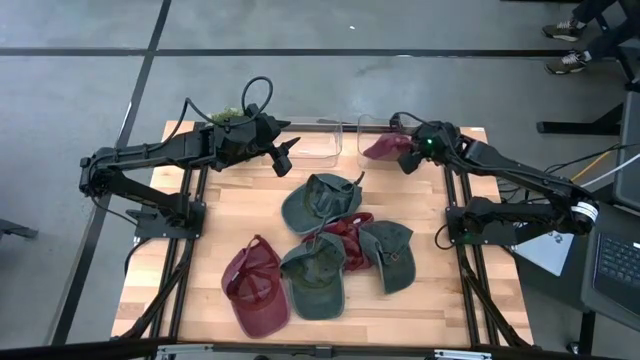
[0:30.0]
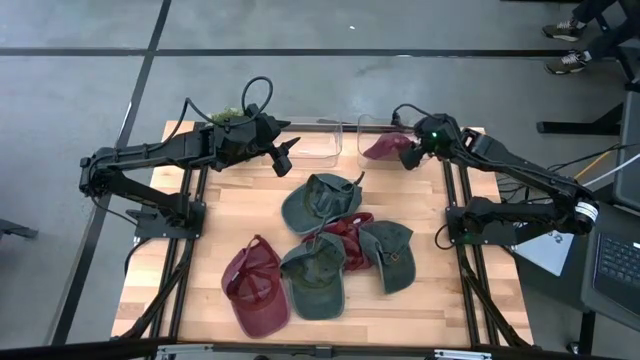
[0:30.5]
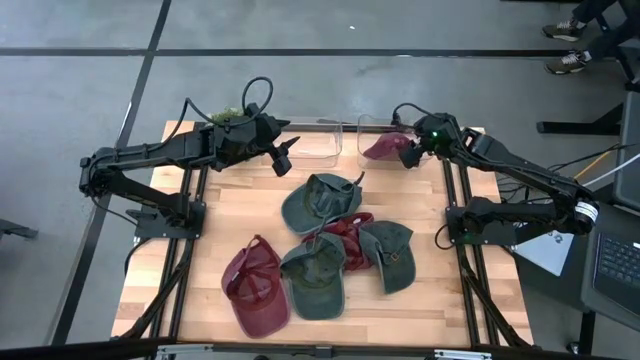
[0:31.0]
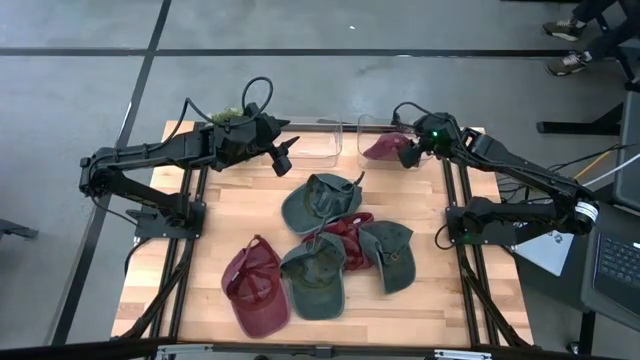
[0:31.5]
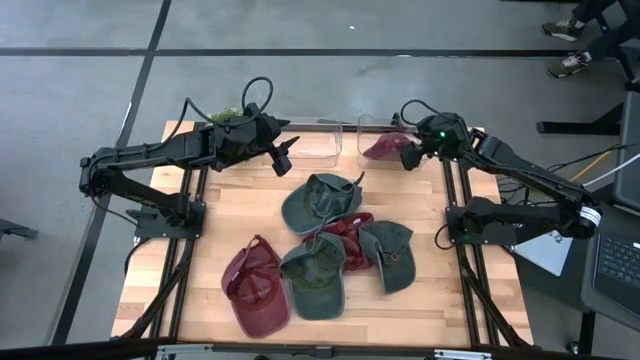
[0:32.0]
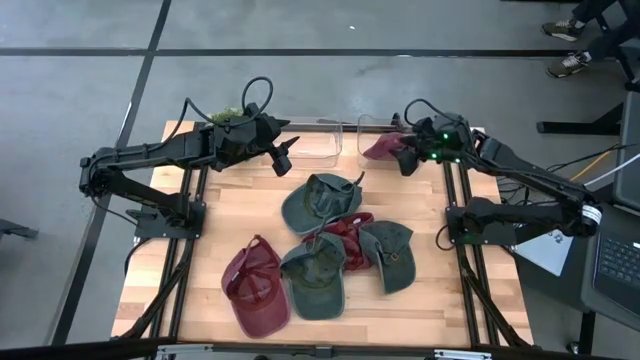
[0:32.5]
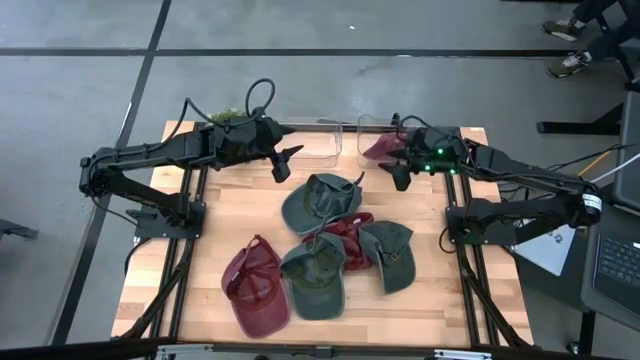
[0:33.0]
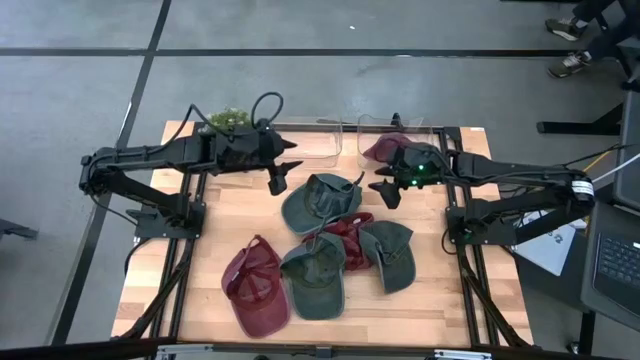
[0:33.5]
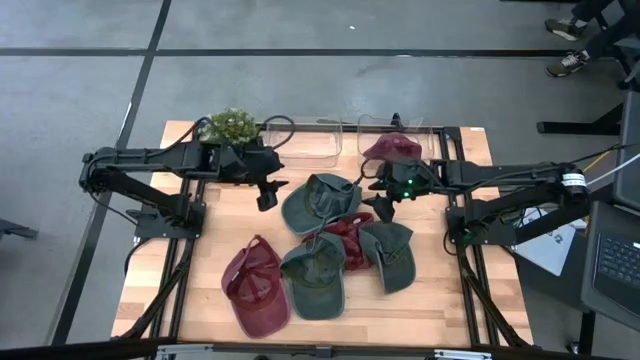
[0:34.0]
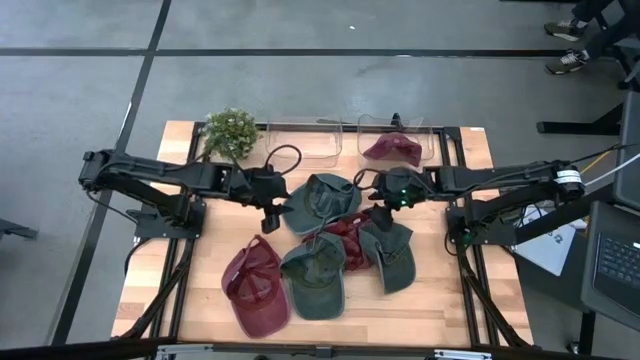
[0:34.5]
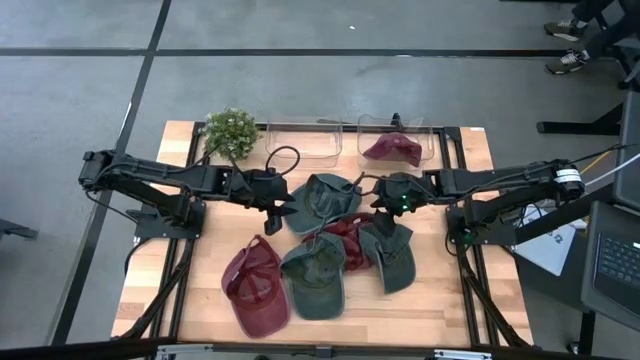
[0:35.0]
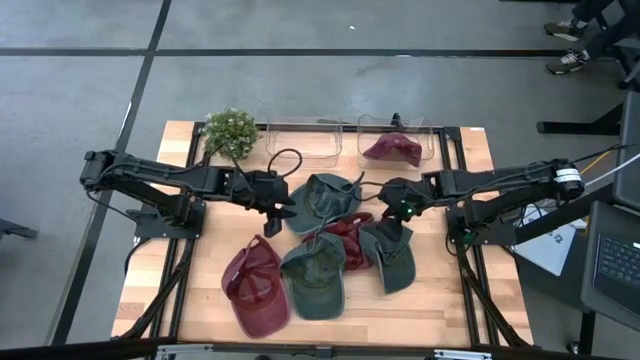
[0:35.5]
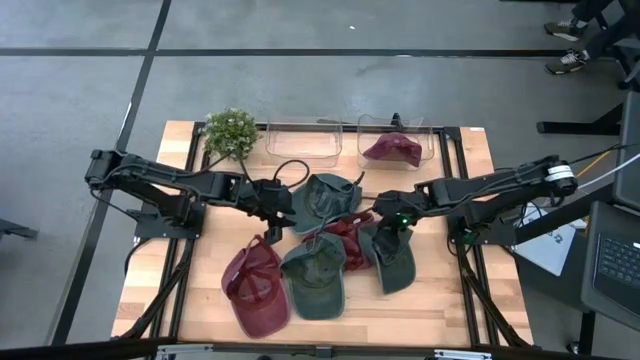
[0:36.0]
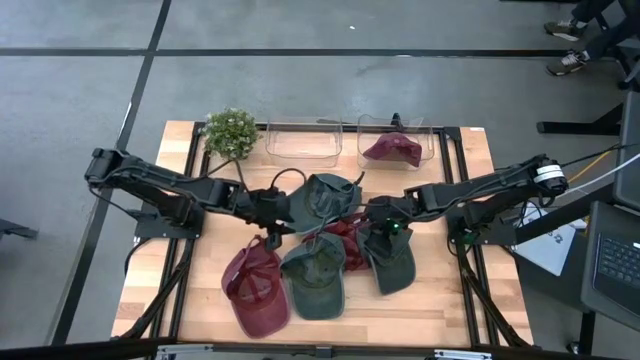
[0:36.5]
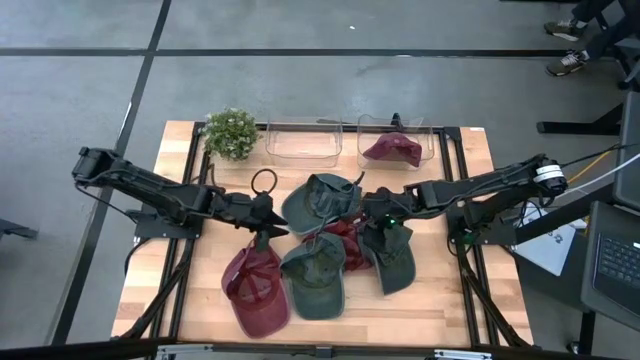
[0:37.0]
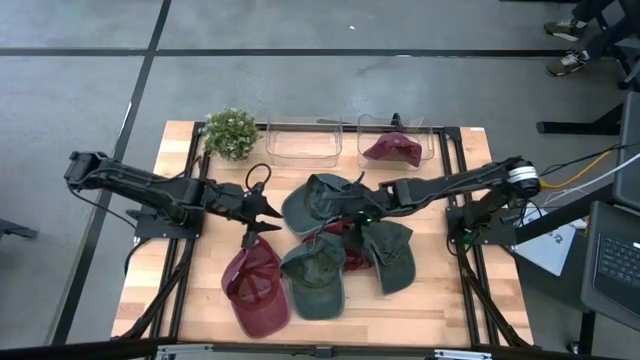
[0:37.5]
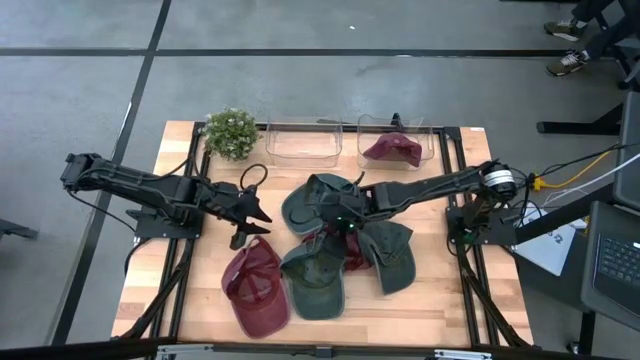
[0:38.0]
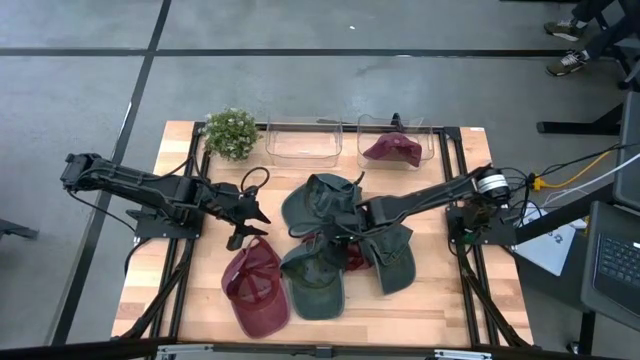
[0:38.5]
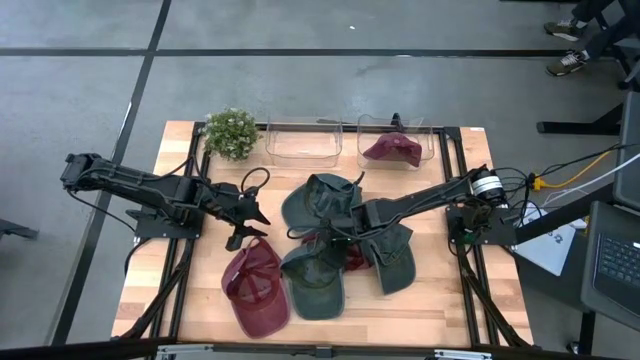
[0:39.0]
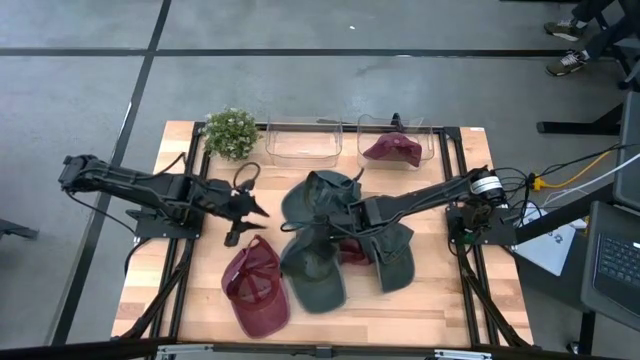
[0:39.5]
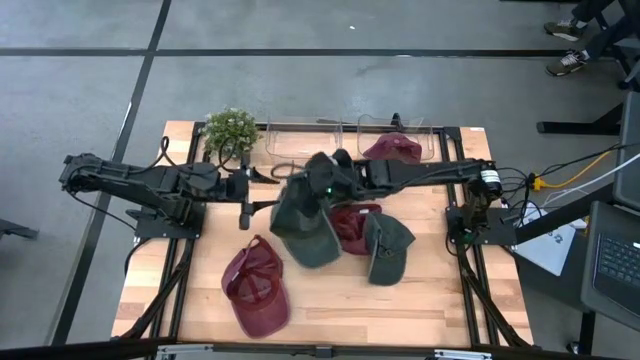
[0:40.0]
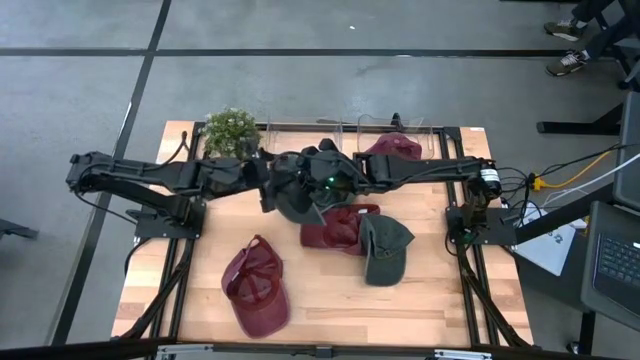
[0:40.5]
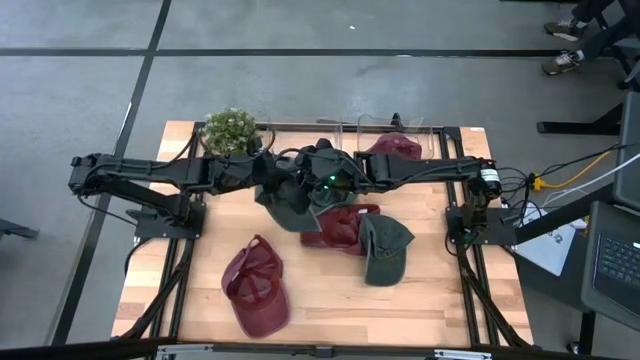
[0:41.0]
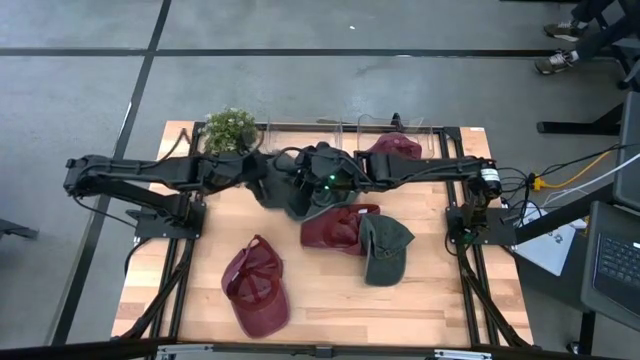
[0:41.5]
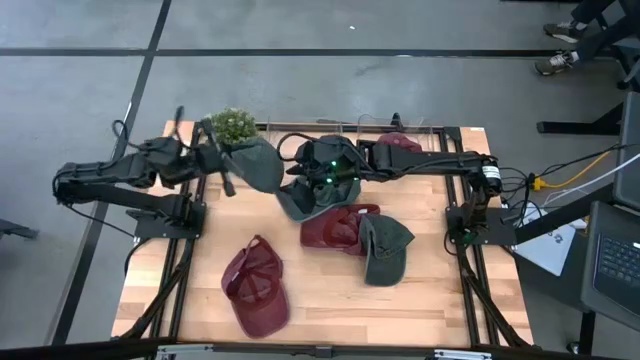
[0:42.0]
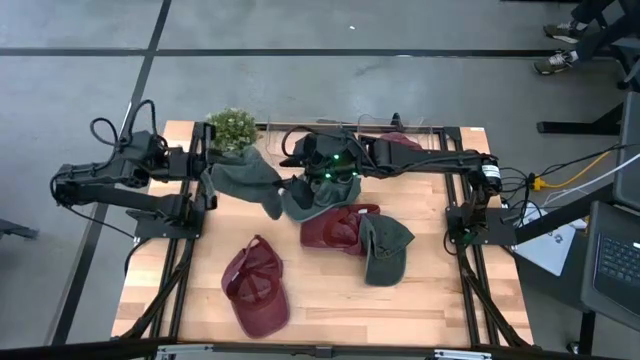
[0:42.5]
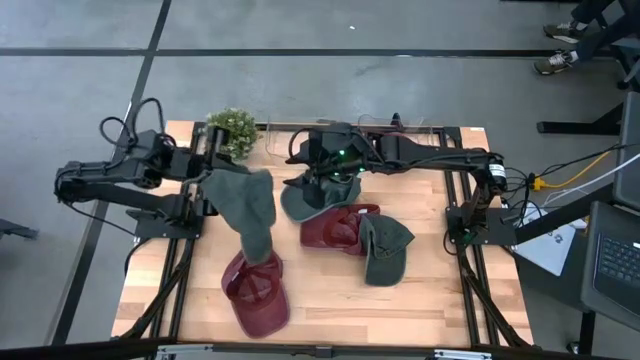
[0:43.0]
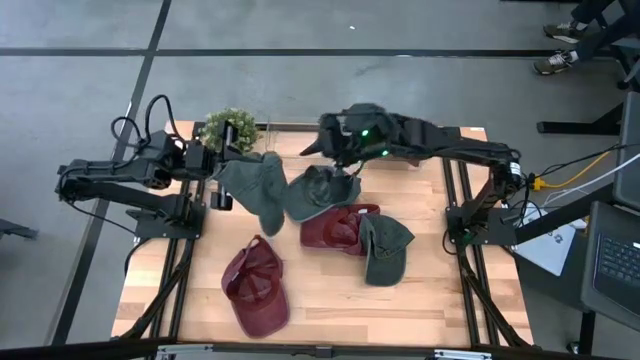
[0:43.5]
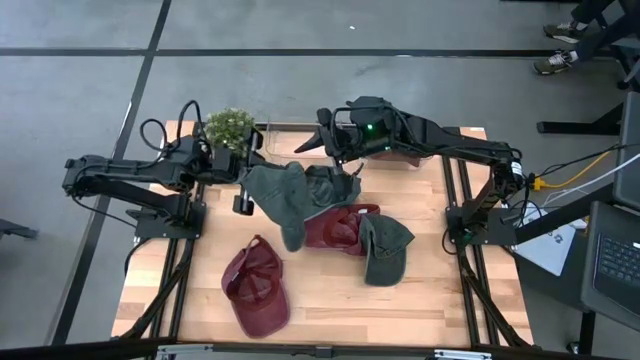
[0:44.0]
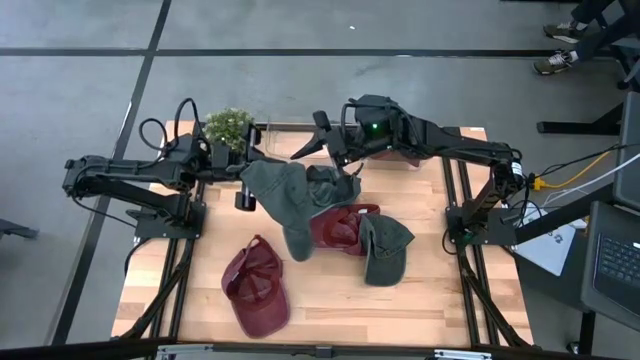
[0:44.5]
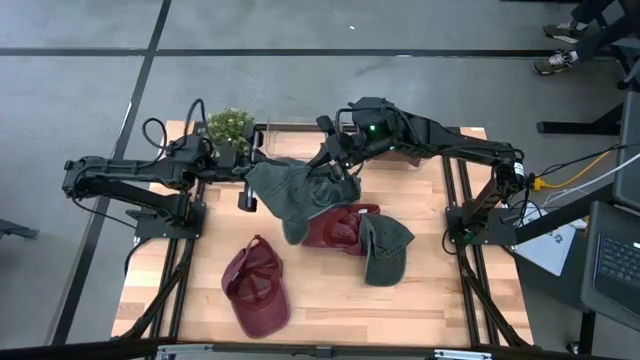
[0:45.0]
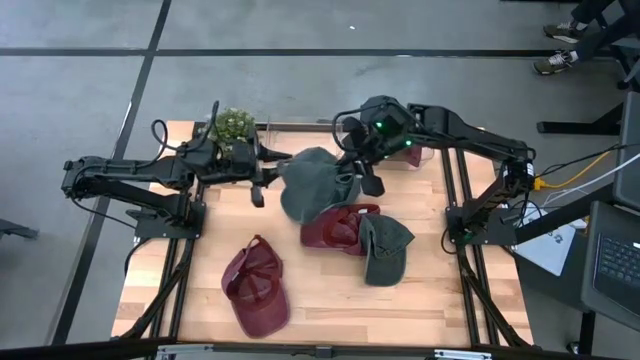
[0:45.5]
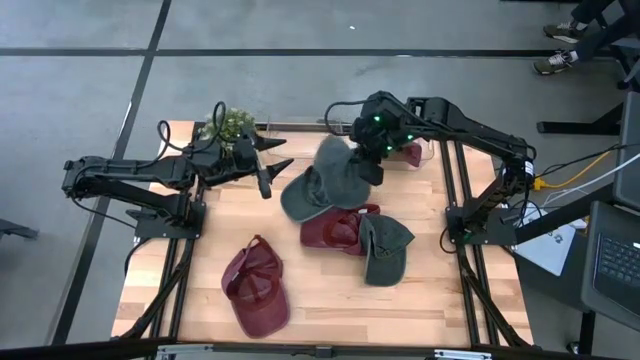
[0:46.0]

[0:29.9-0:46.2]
Task: Pick & Place hat
Put the bottom left gray cap into the left transparent bin

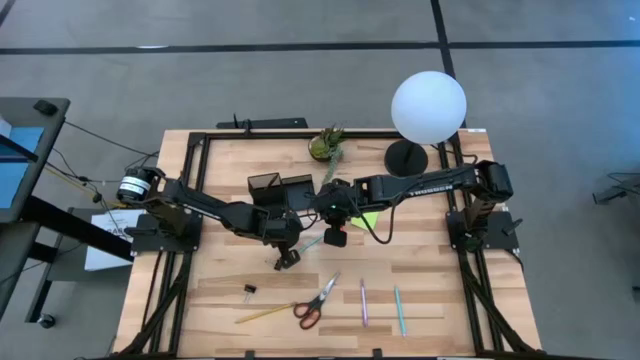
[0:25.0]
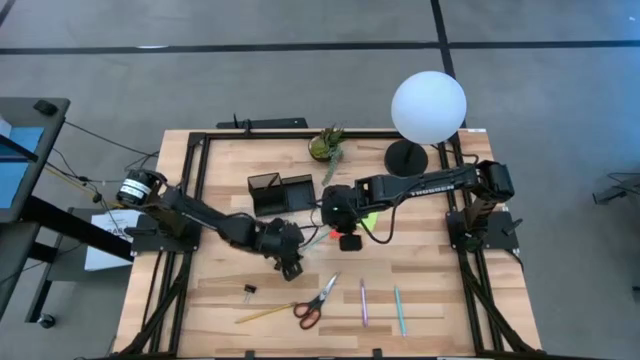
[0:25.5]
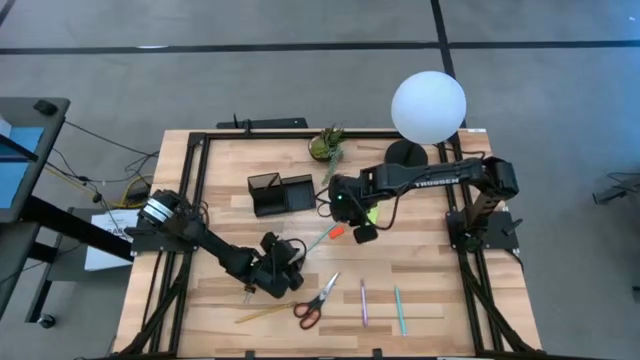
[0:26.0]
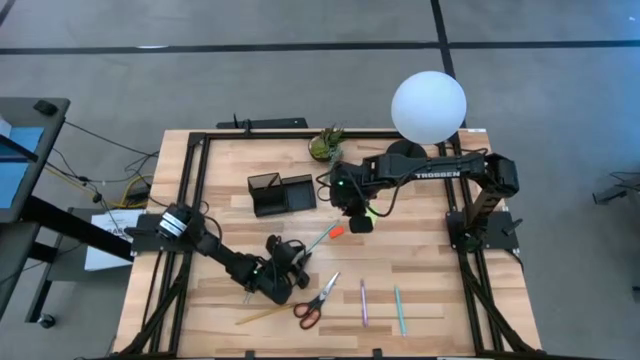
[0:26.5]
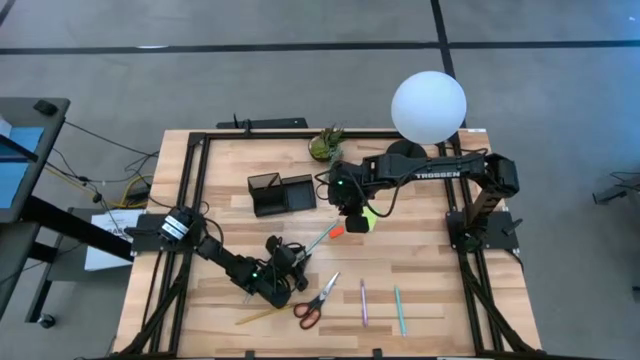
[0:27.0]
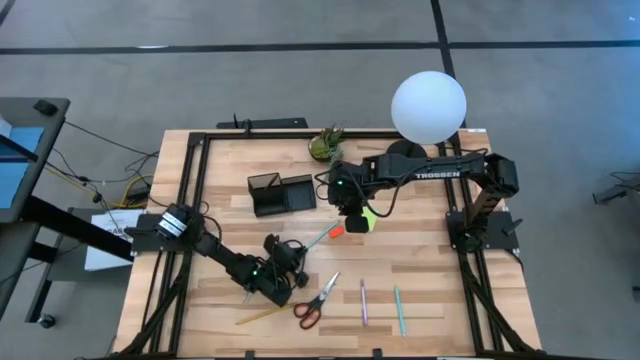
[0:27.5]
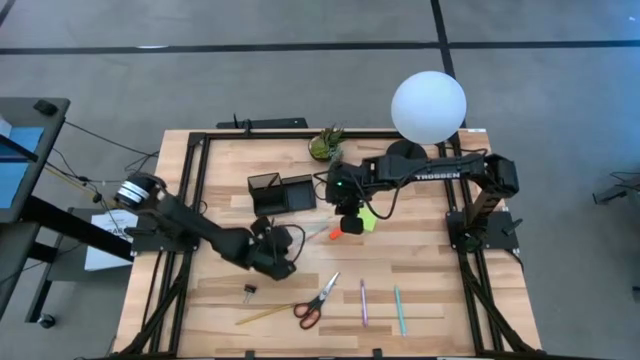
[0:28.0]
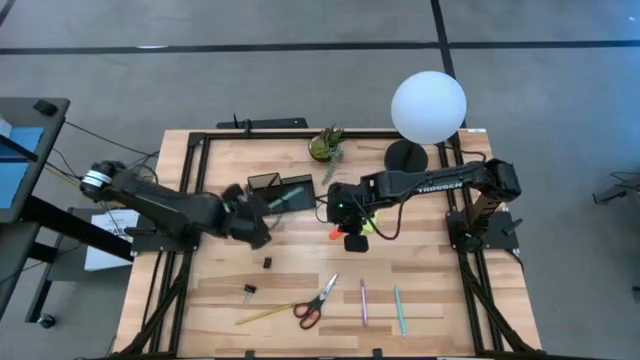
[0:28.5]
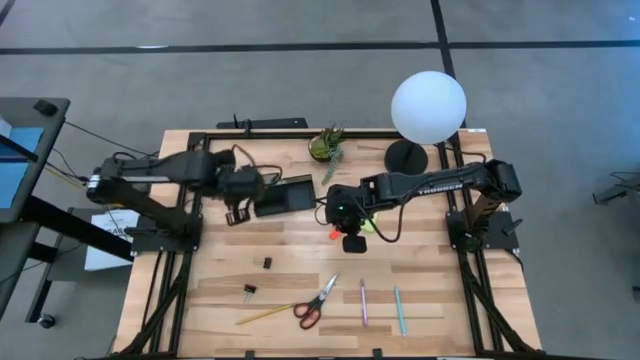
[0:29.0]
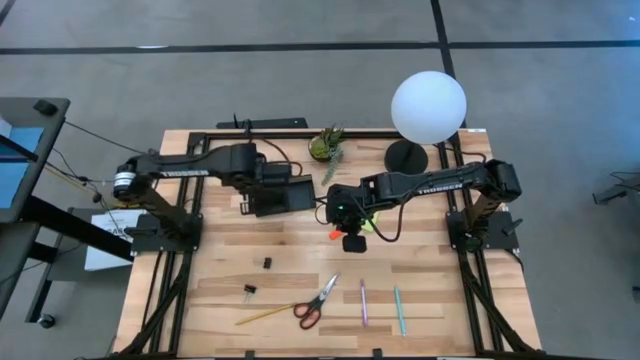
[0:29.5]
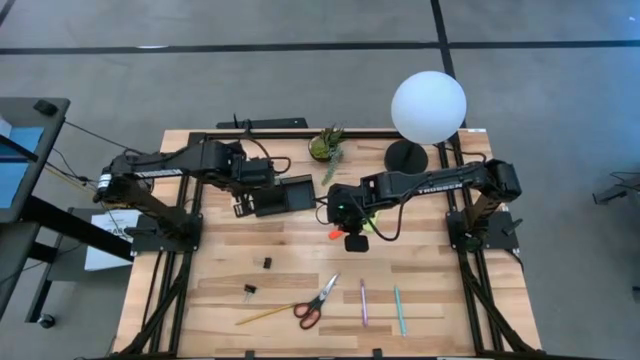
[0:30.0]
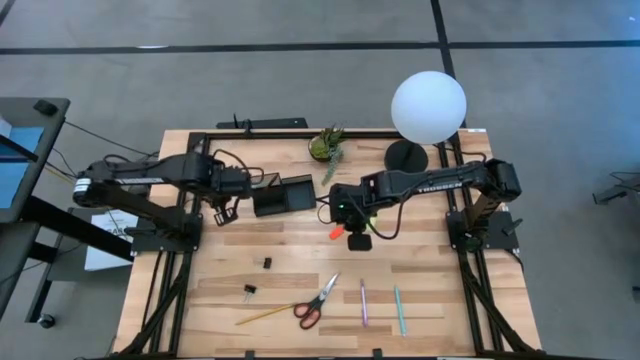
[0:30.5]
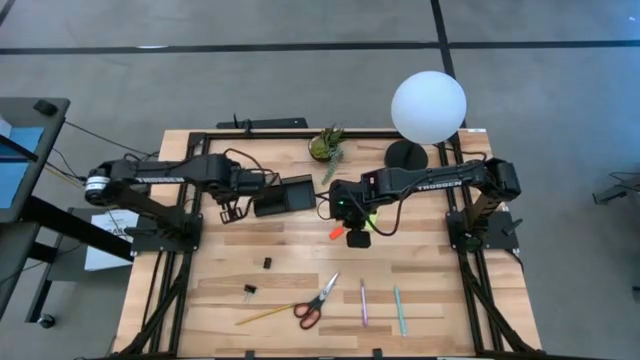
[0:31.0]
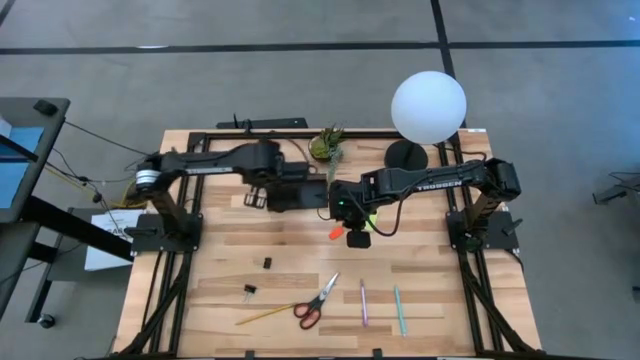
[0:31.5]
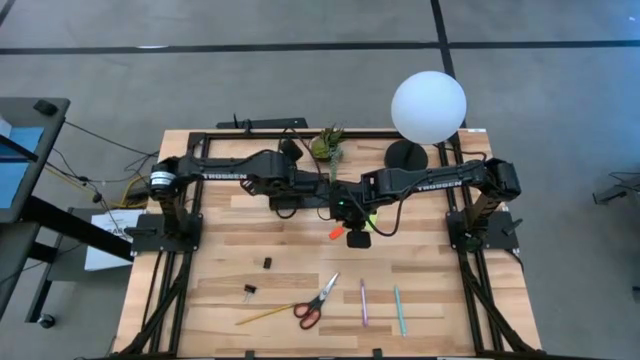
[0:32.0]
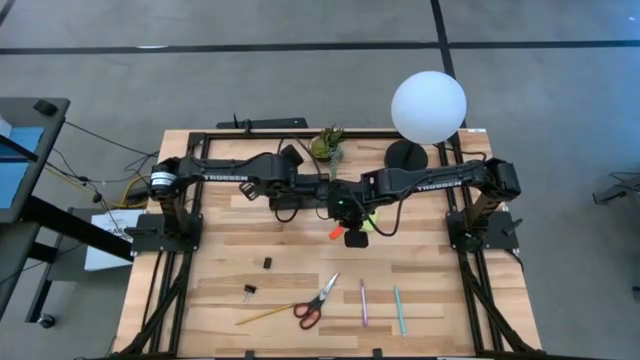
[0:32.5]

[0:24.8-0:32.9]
Task: Pick and place office supplies into organizer
Put the blue pencil into the black desk organizer
